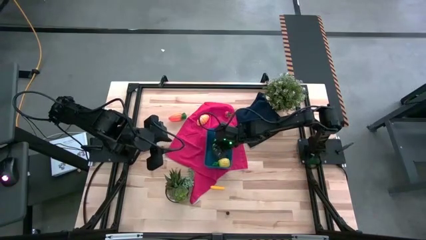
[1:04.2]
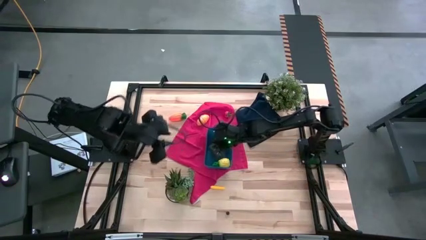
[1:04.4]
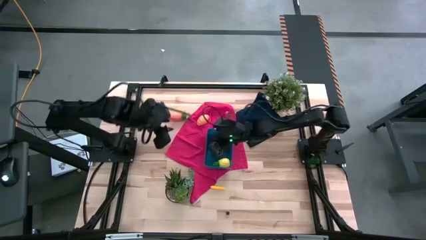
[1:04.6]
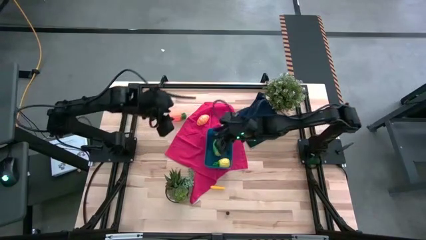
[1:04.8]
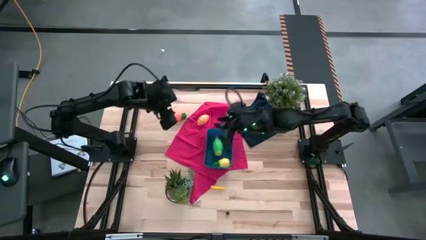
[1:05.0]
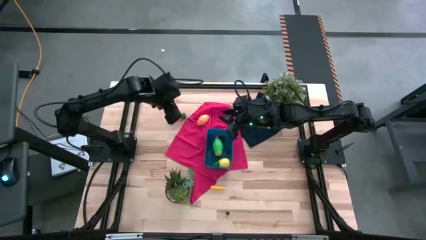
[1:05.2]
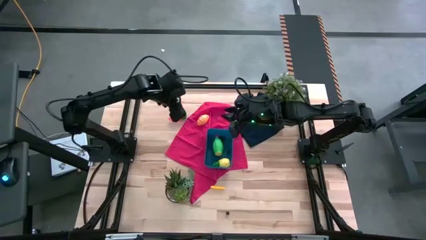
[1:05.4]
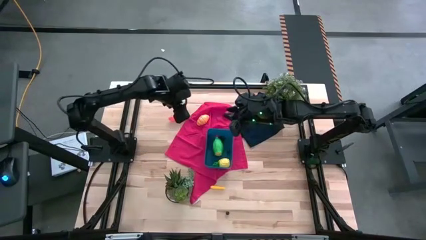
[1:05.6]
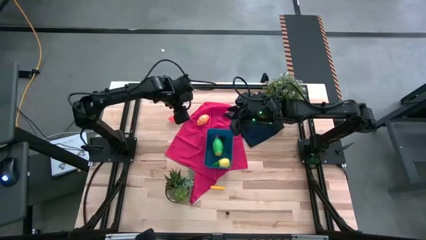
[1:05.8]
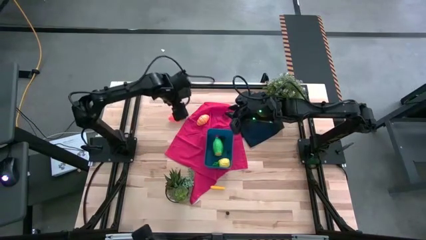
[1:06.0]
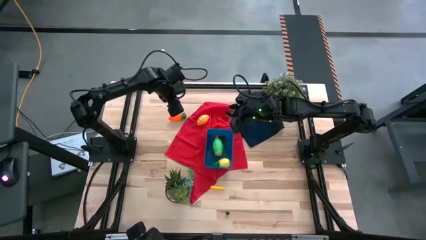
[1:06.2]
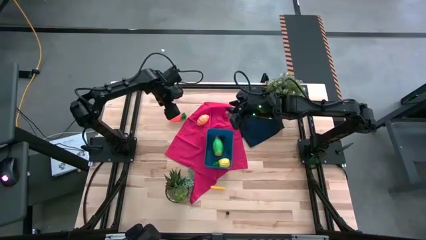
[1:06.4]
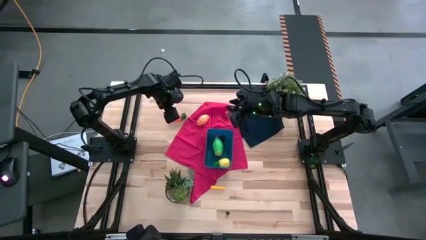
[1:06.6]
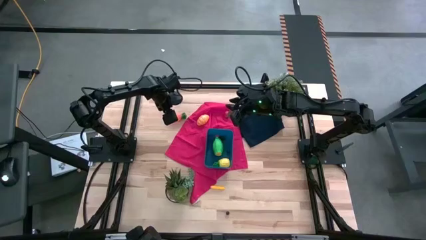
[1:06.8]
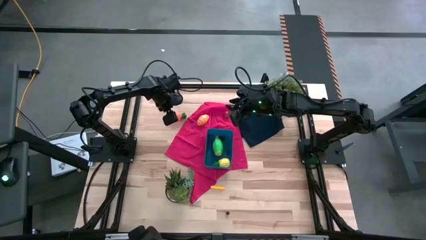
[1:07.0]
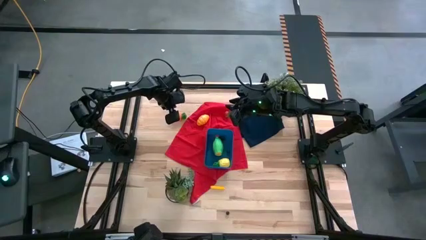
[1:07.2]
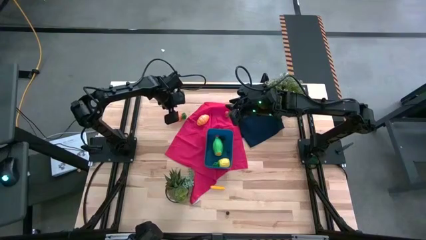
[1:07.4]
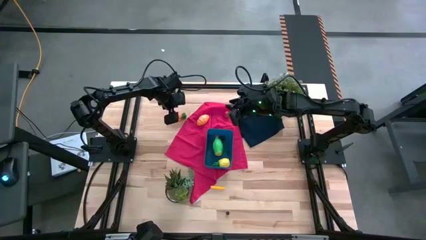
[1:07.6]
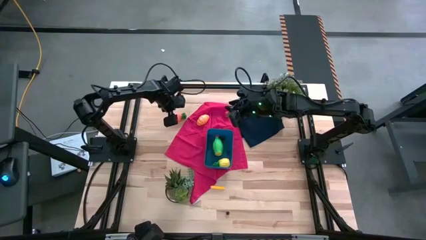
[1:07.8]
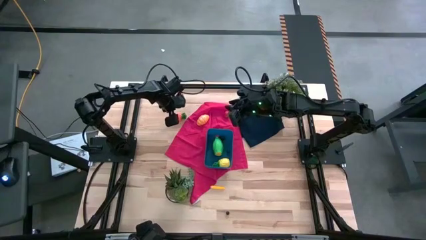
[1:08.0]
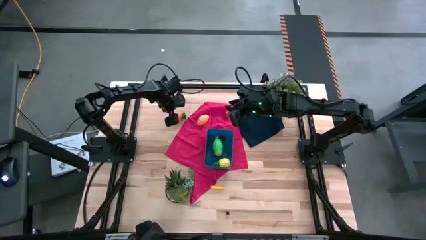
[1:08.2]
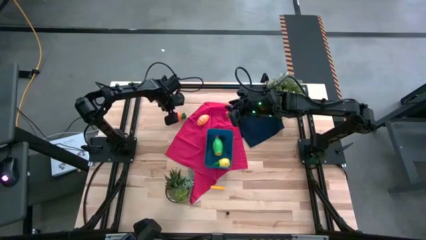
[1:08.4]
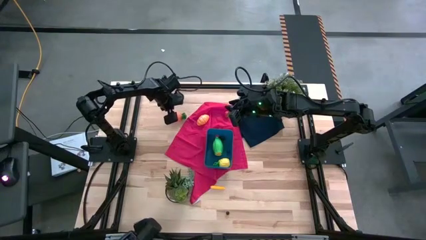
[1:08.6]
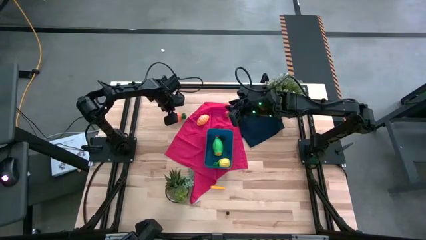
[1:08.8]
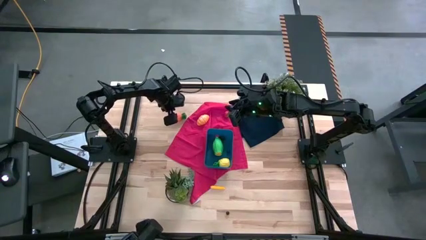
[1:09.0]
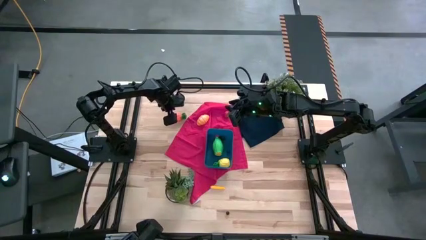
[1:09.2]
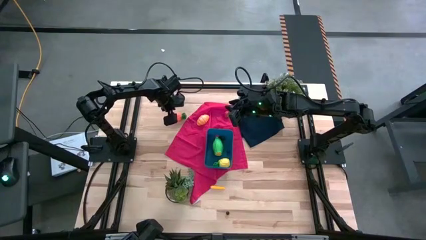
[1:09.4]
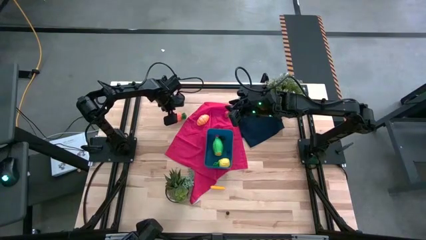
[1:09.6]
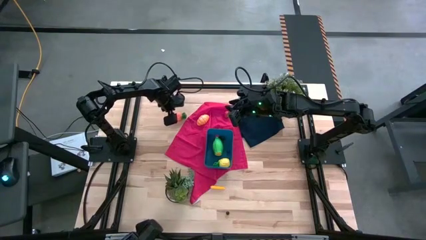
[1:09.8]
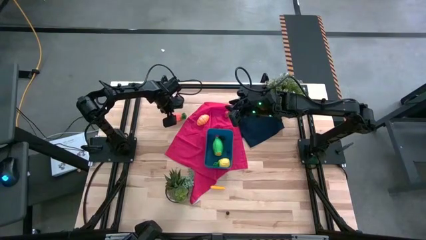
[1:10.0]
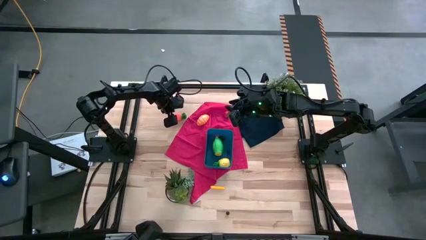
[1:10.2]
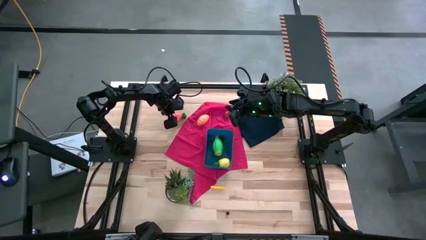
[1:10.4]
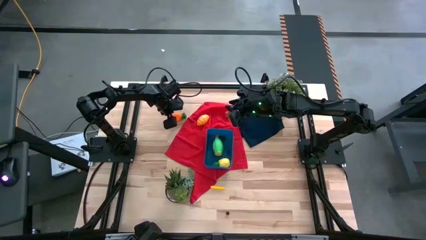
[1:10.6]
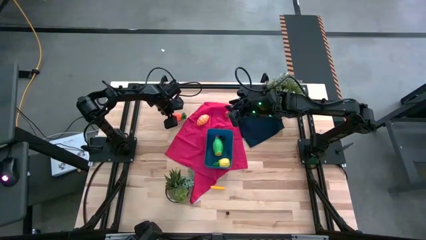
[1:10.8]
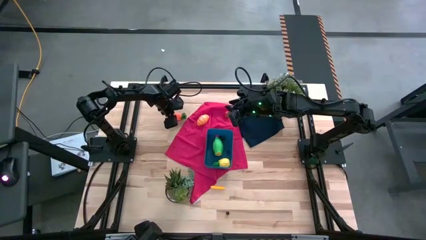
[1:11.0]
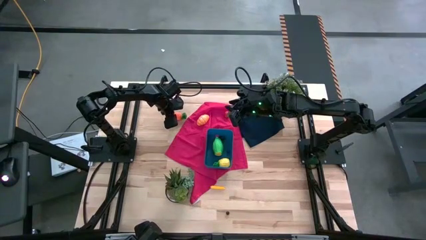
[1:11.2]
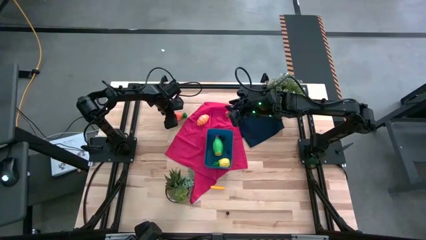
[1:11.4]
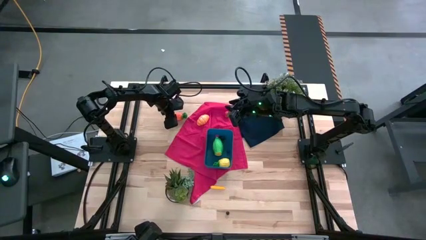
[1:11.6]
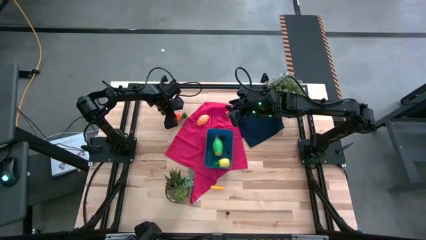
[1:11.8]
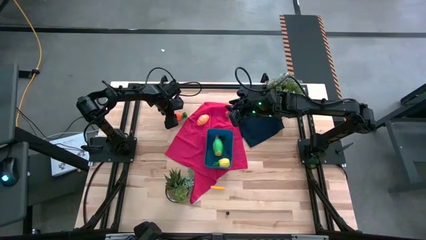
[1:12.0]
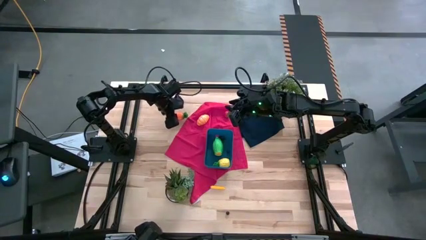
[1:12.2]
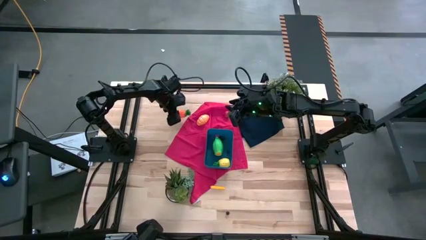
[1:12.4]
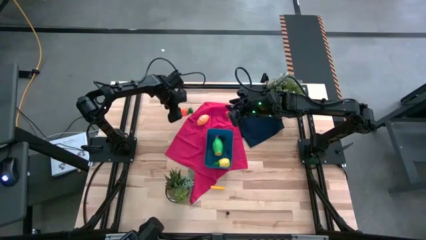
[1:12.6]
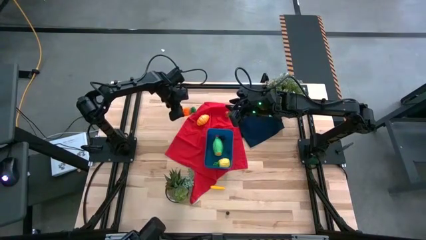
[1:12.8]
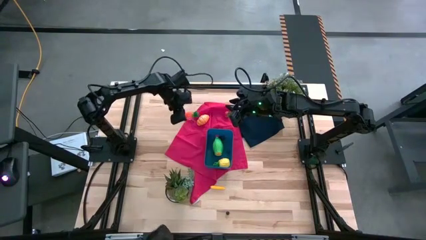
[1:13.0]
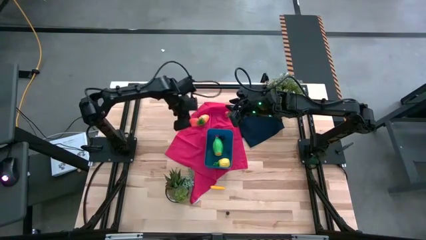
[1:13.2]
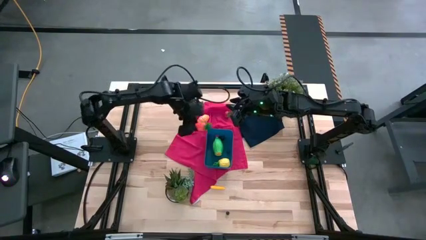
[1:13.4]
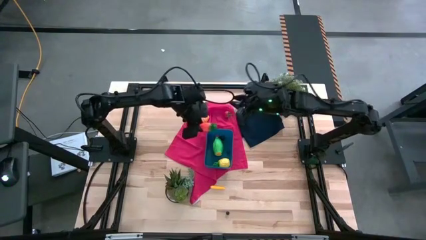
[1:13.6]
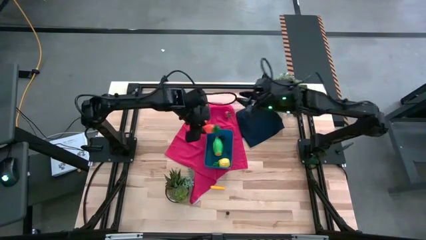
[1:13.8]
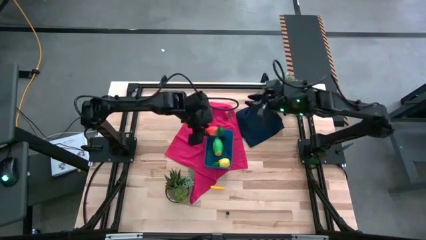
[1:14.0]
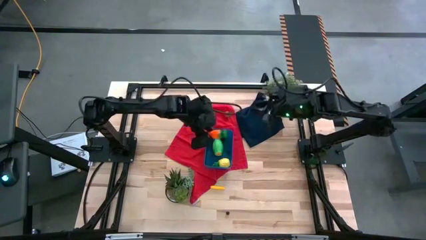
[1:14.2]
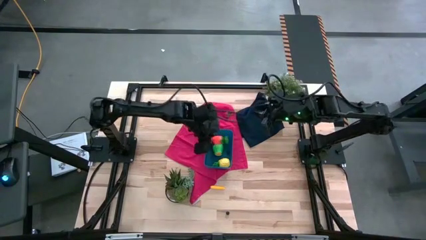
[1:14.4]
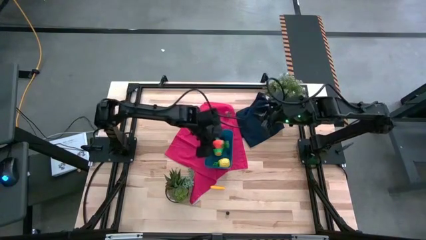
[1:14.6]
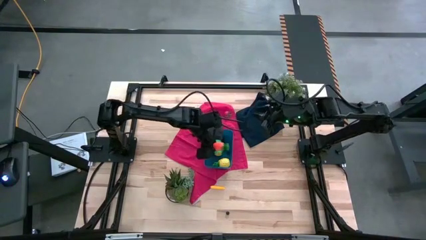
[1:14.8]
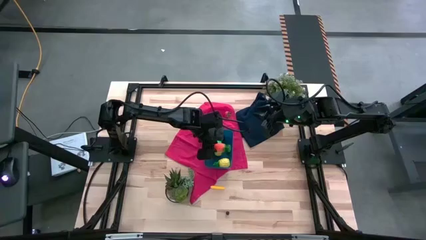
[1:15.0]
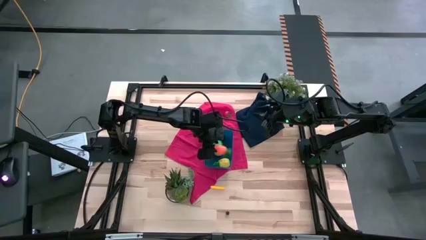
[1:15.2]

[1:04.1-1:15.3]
Task: Pick and placing Produce into tupperware
Put the carrot into the blue bin

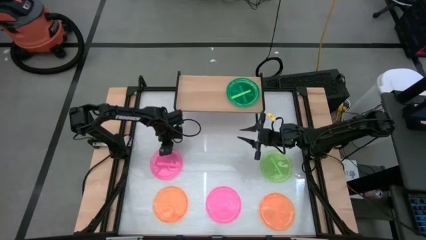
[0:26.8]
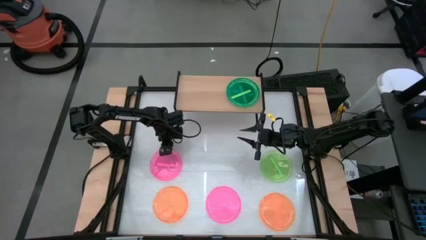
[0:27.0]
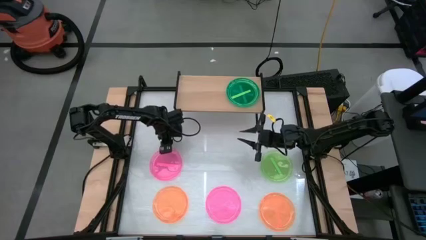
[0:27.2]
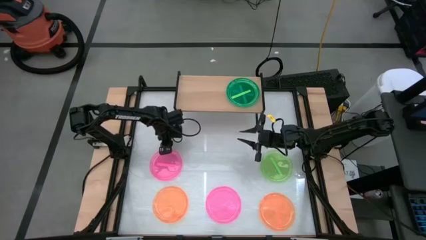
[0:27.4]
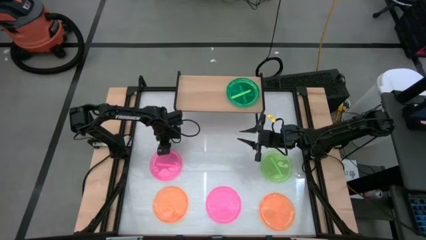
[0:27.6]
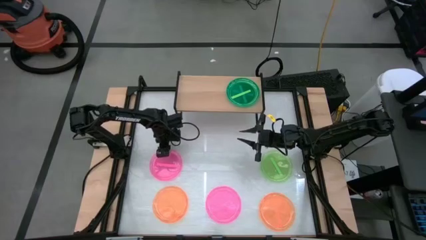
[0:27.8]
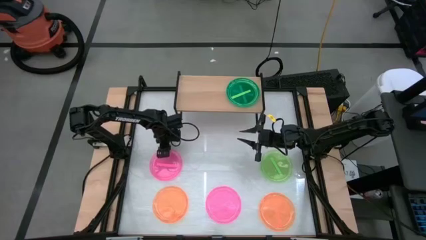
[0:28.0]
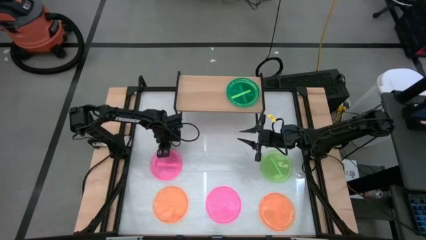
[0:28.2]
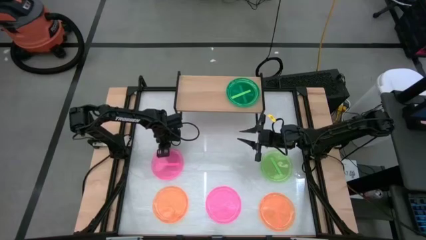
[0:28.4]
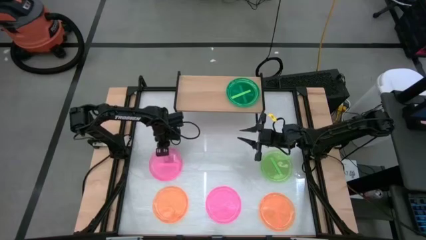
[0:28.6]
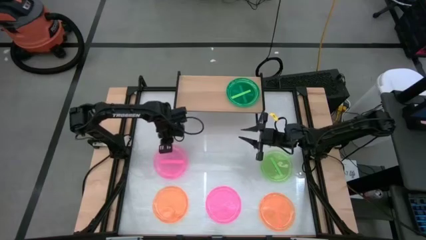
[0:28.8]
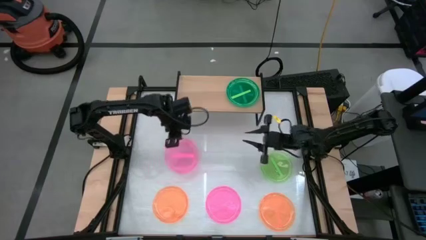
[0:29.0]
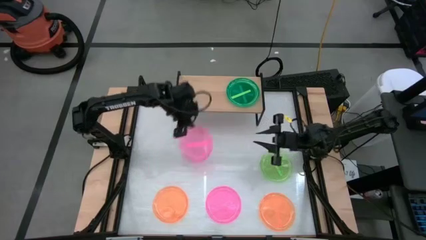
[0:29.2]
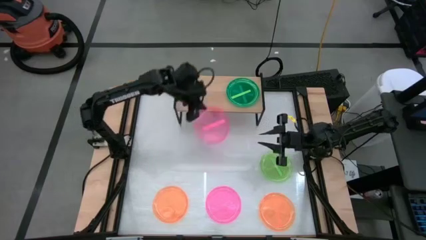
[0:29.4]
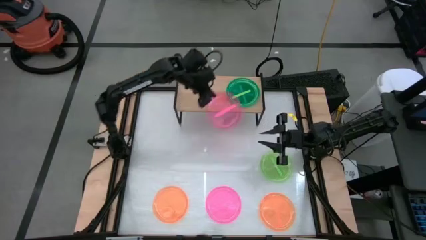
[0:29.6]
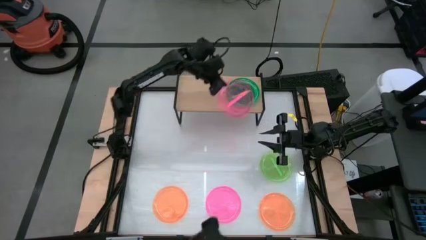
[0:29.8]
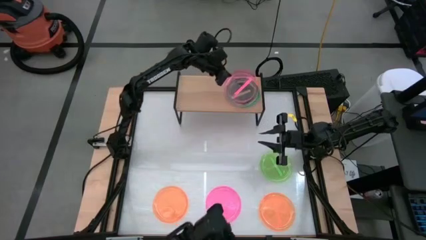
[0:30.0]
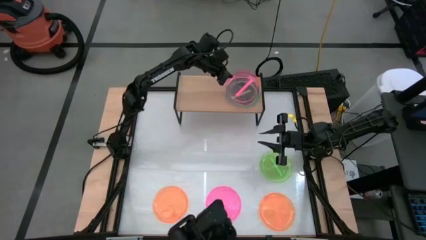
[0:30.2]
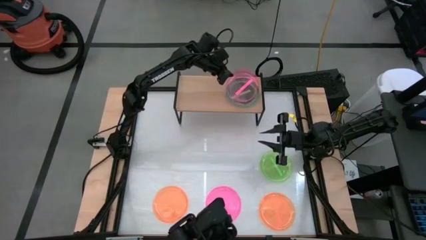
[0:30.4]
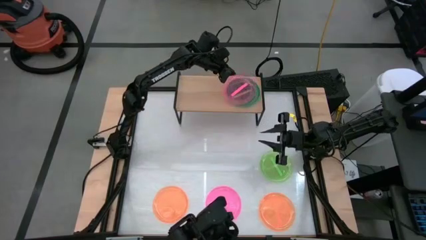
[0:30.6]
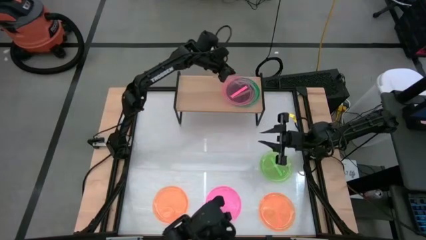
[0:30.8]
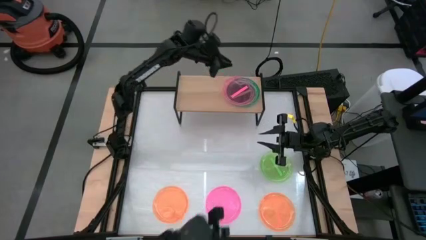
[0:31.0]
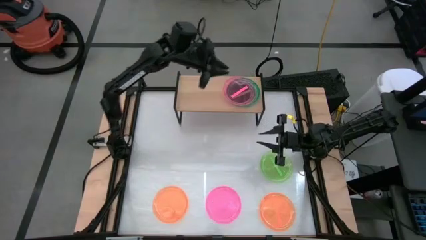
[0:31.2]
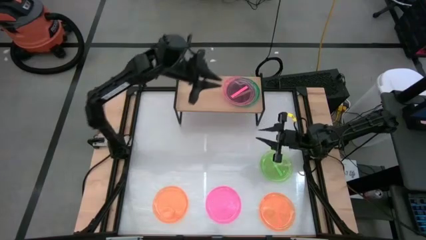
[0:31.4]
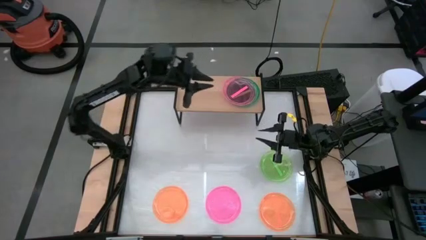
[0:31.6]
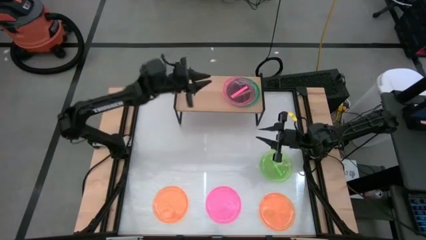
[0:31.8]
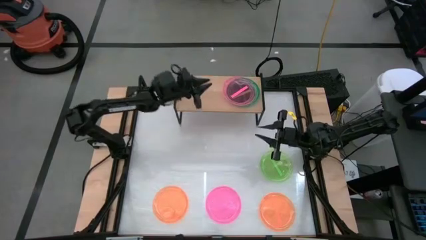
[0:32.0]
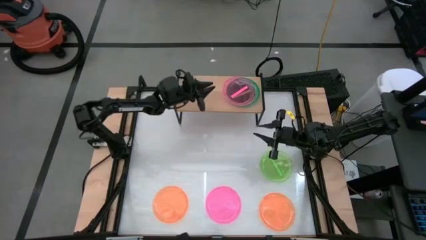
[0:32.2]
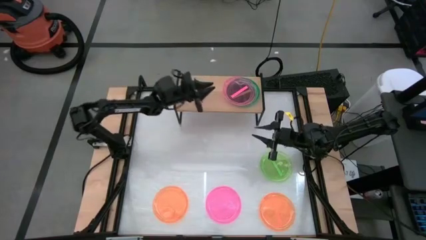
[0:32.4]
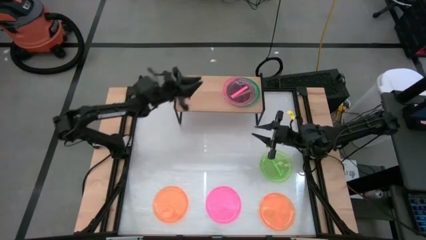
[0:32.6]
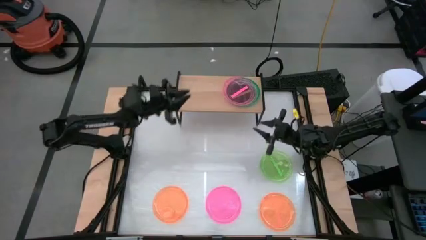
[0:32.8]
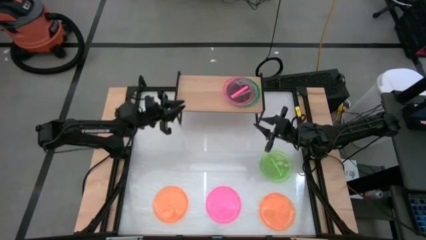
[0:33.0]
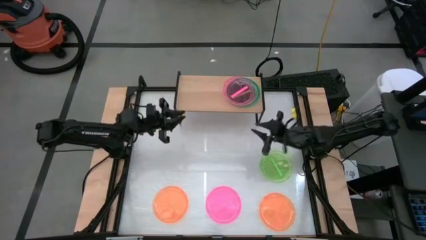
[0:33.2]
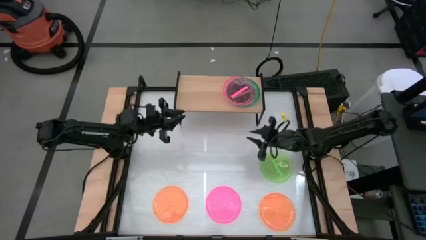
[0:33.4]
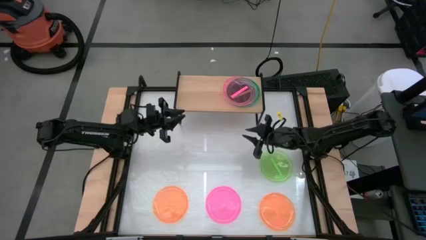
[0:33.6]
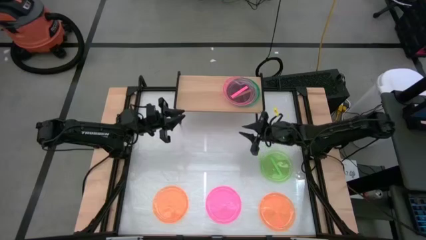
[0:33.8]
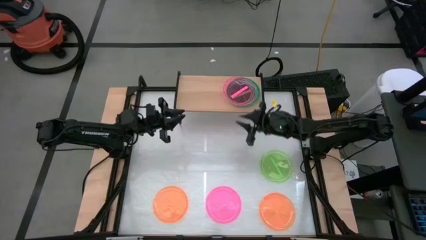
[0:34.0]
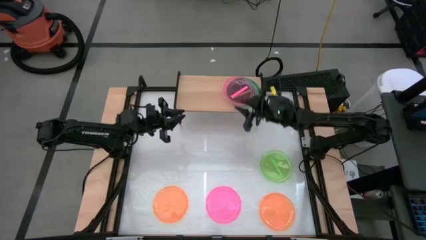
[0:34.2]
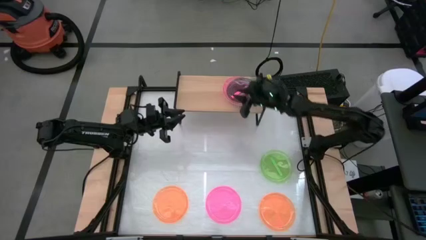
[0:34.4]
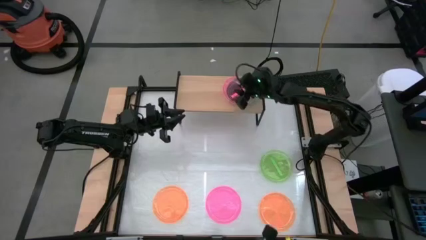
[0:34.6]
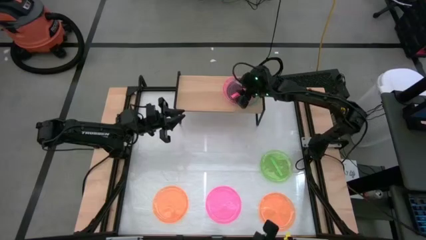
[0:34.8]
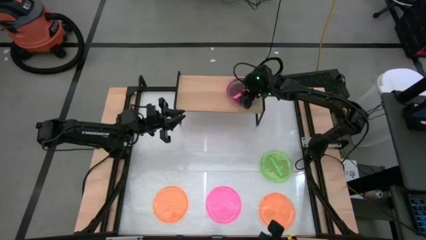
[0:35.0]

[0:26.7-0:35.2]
Task: Place and stack plates onto a shelf
Stack the top pink plate on the green plate on the shelf
